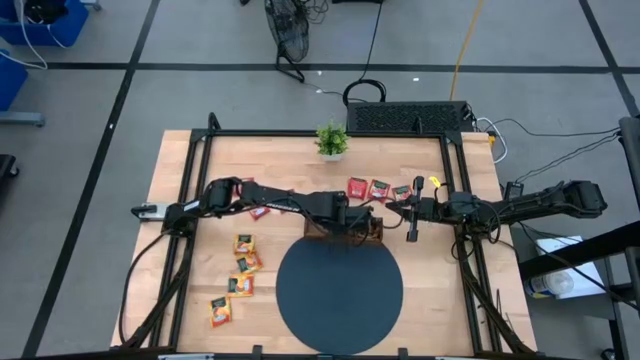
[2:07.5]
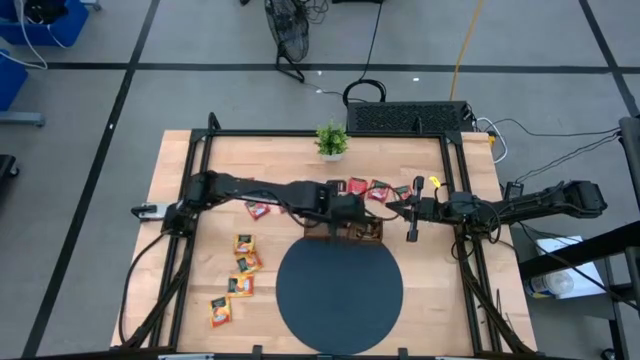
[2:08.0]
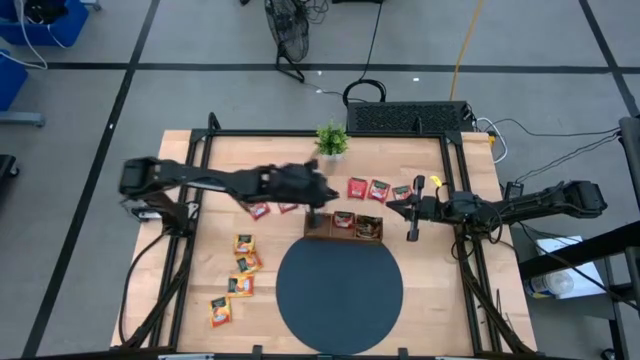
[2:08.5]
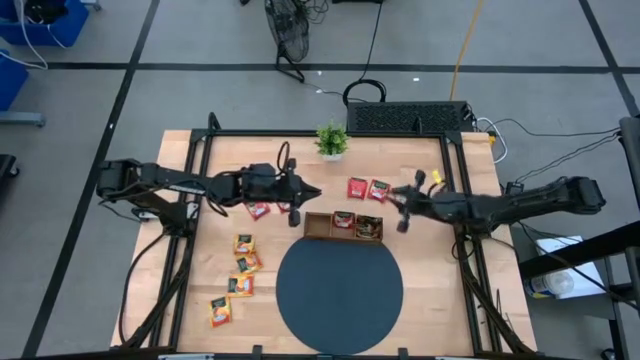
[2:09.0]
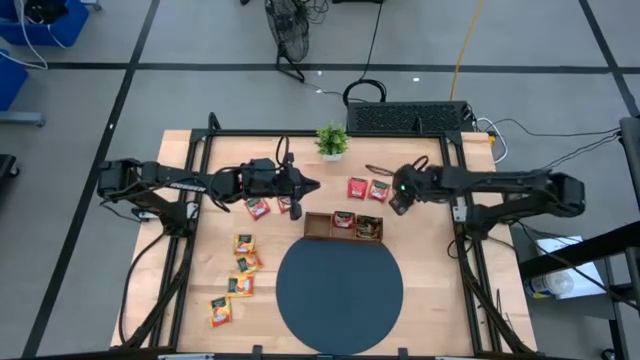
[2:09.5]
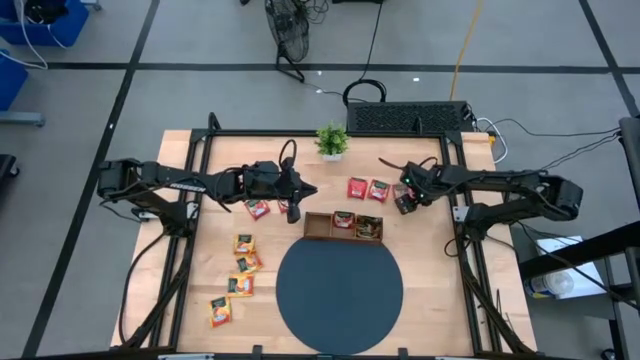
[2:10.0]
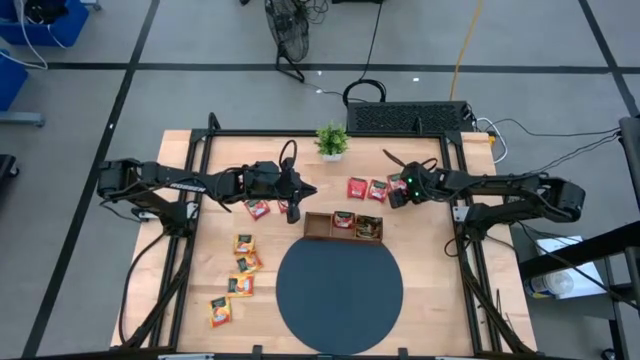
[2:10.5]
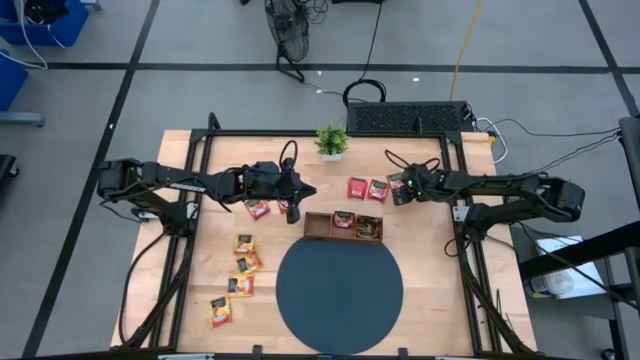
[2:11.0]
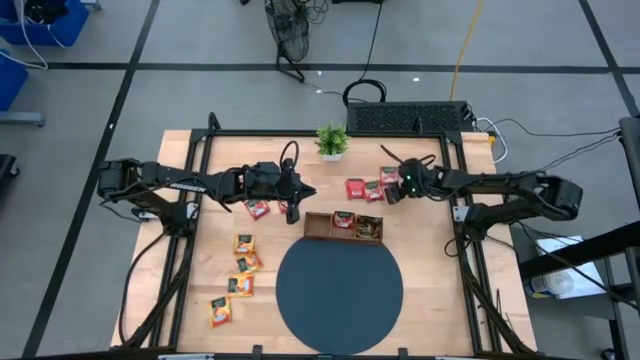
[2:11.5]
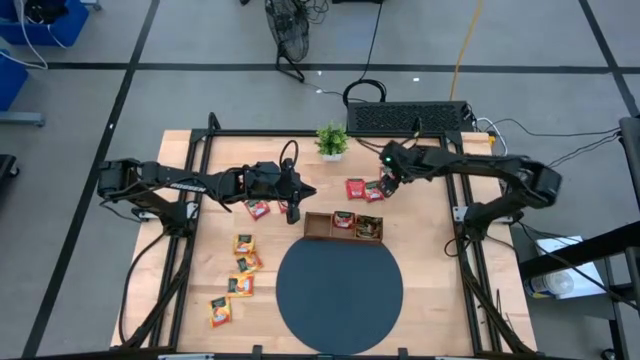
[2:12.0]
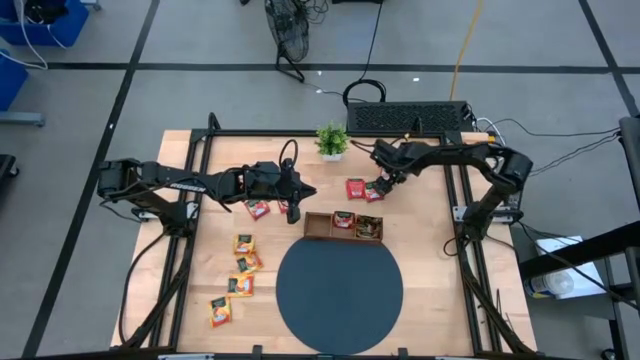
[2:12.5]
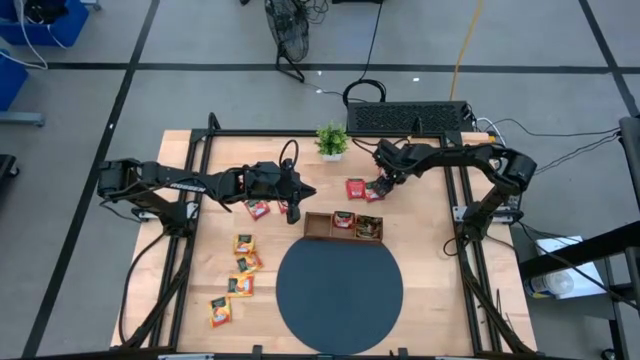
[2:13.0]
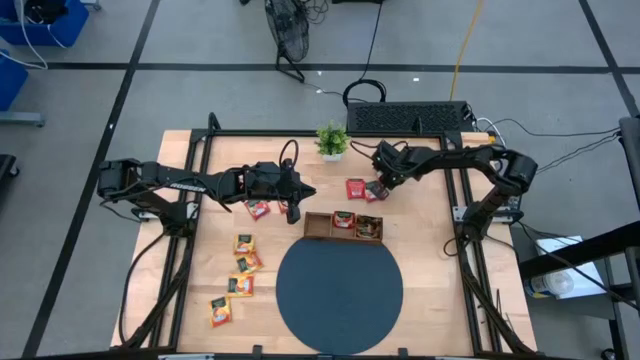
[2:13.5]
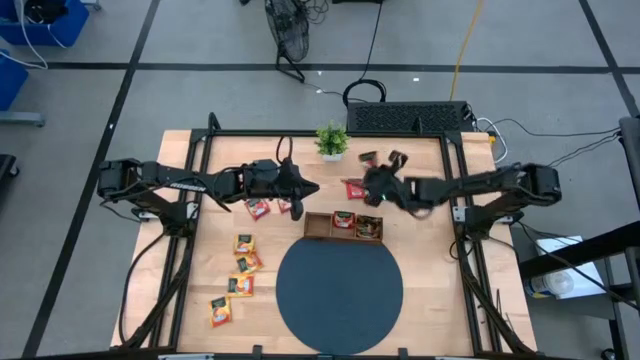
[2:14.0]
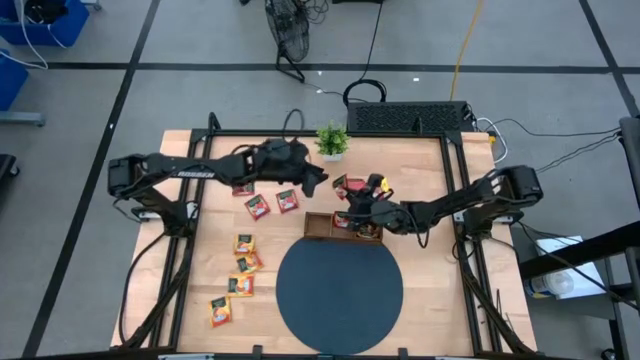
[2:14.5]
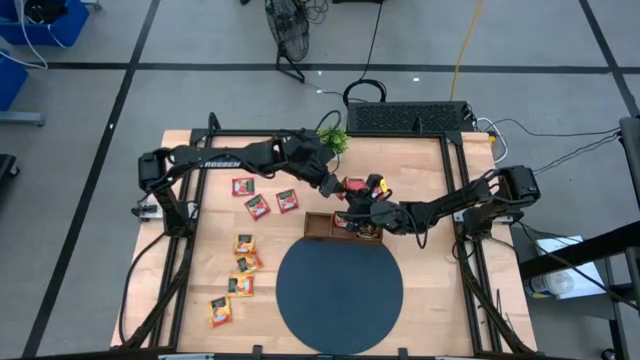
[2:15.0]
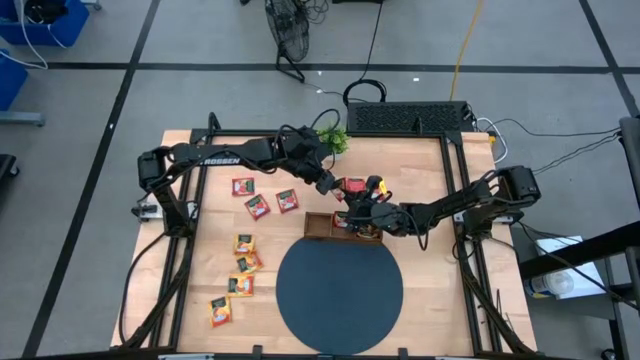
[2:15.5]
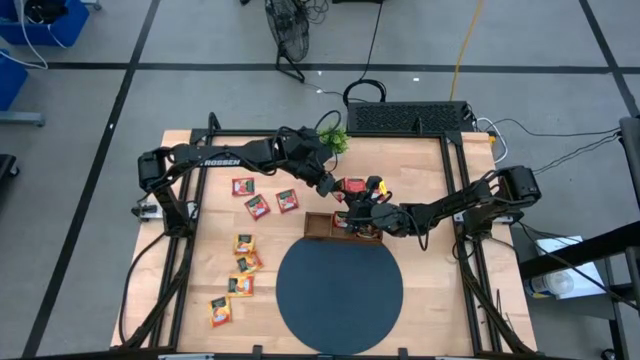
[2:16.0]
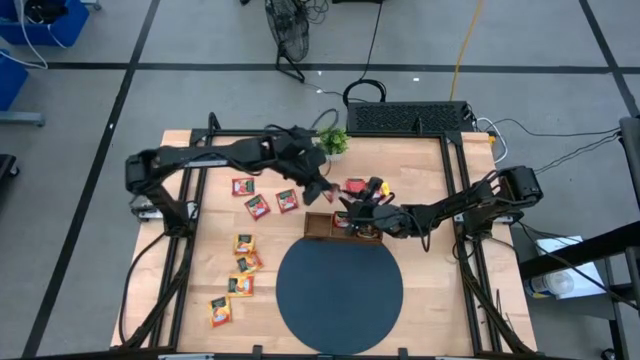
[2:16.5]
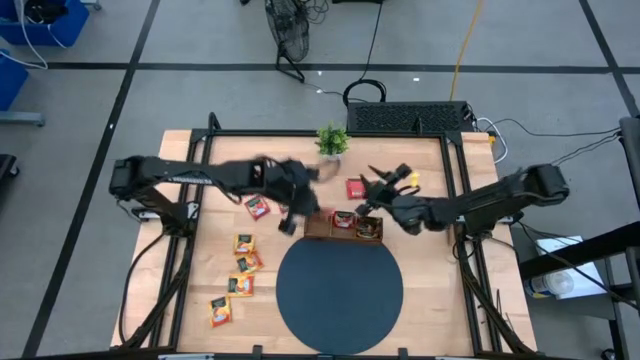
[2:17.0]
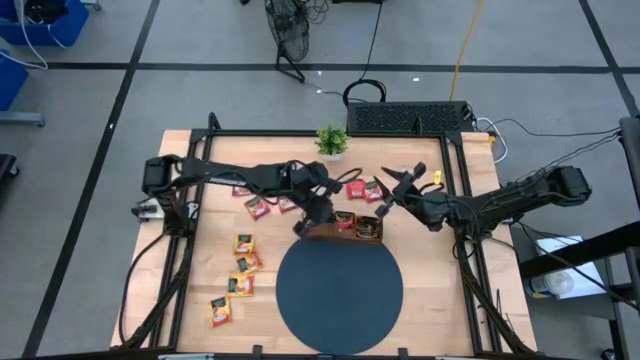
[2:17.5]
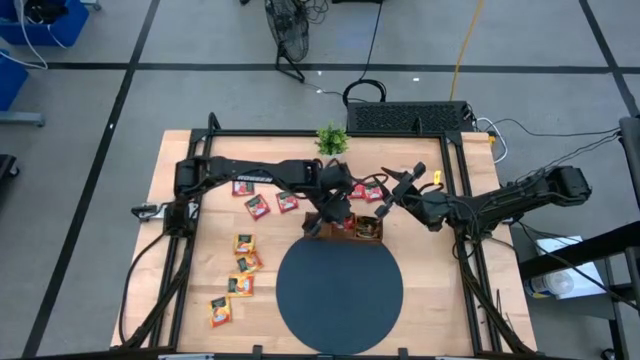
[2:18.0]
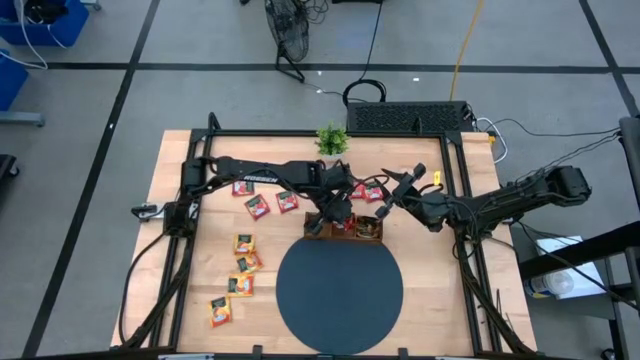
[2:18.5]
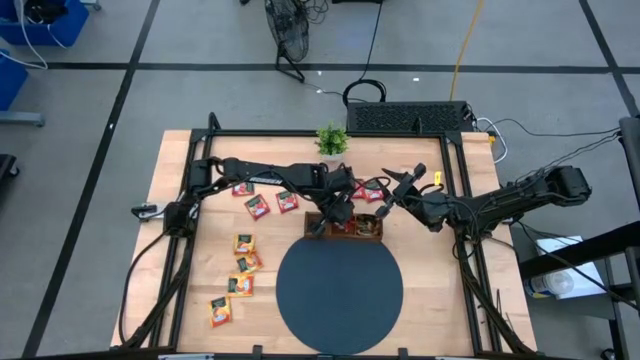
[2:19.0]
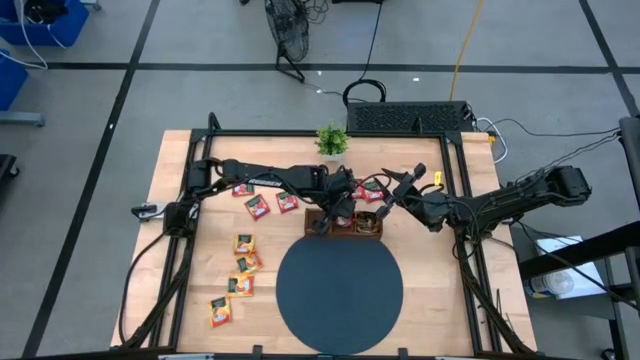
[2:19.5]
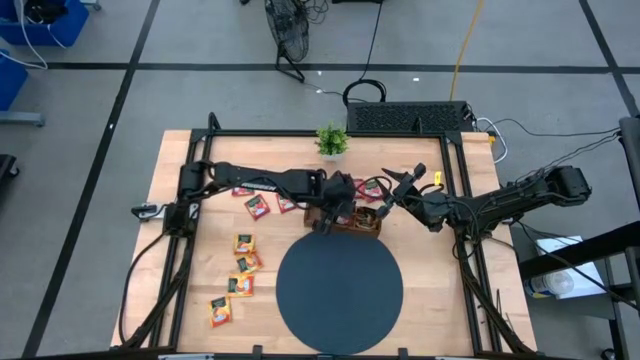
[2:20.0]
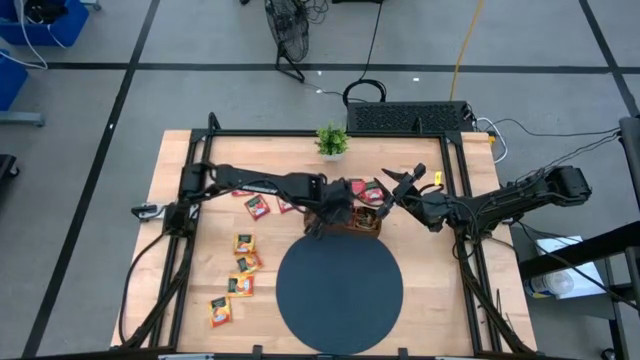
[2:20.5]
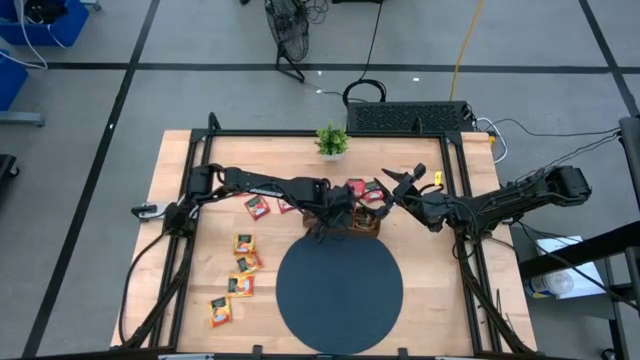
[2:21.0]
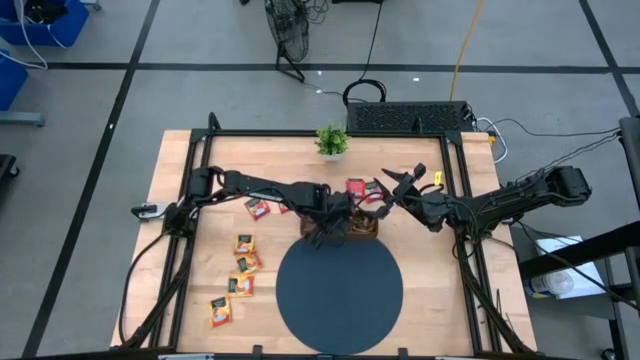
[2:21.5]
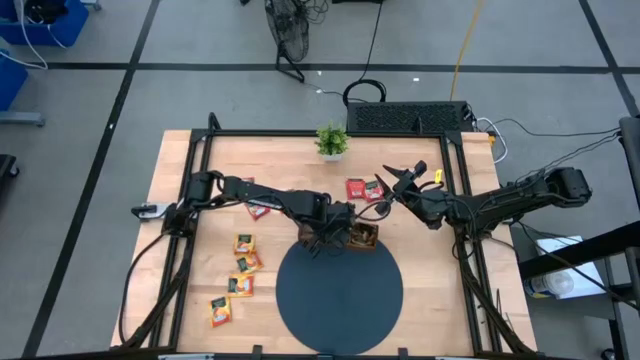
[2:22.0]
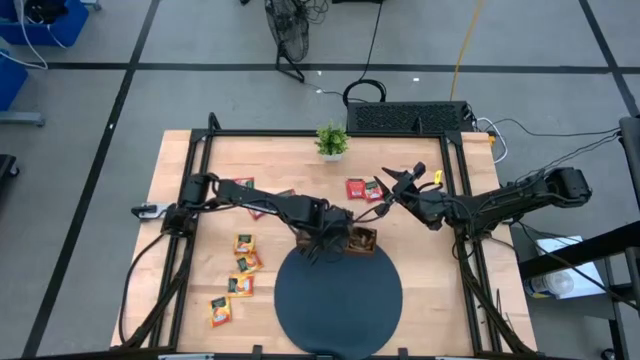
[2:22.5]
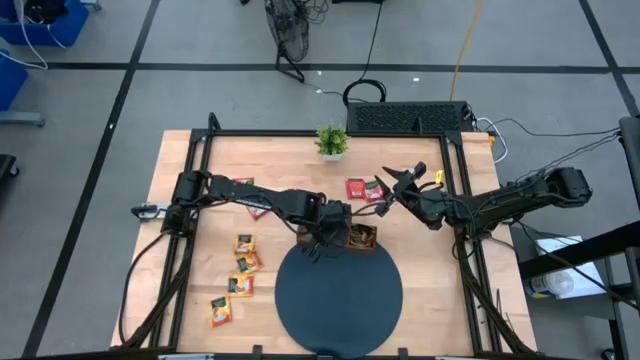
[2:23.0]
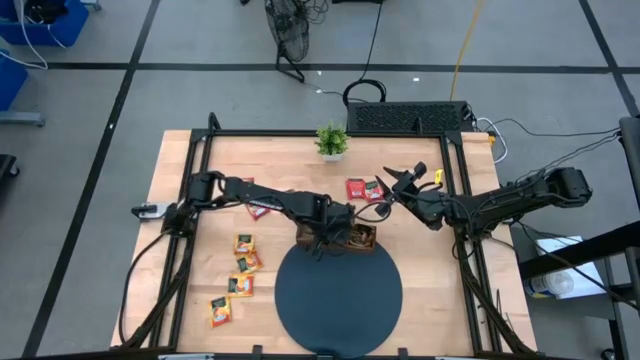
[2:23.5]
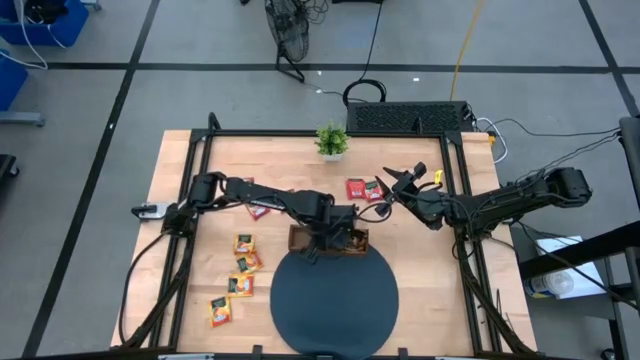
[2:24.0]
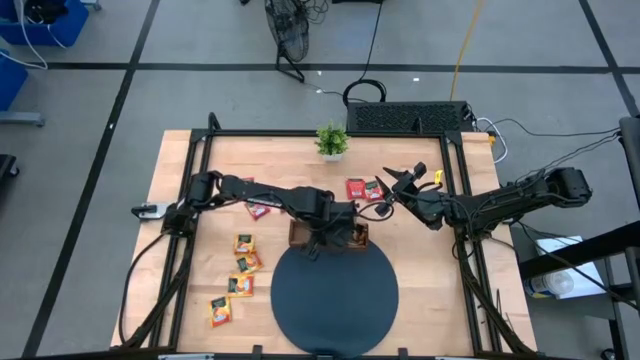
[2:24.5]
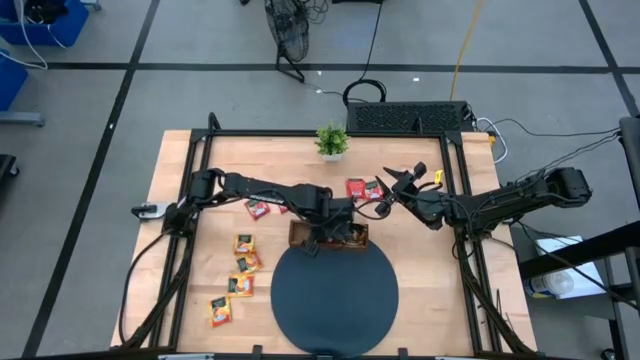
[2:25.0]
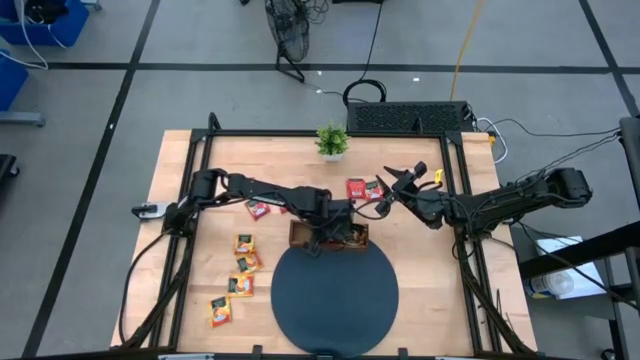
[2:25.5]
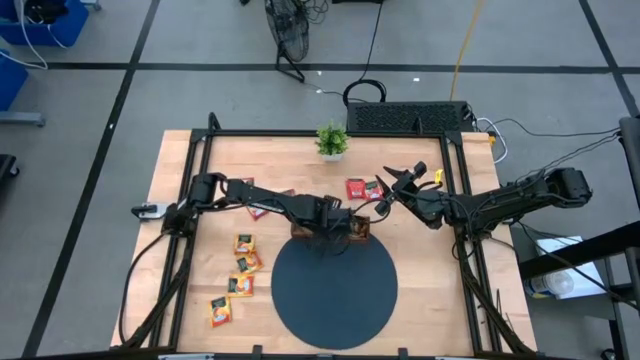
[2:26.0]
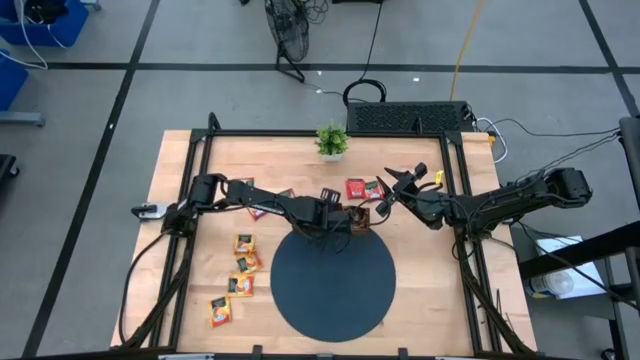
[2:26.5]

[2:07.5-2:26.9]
Task: Pick & Place Tea
Put the red tea bag into the middle slot of the wooden organizer

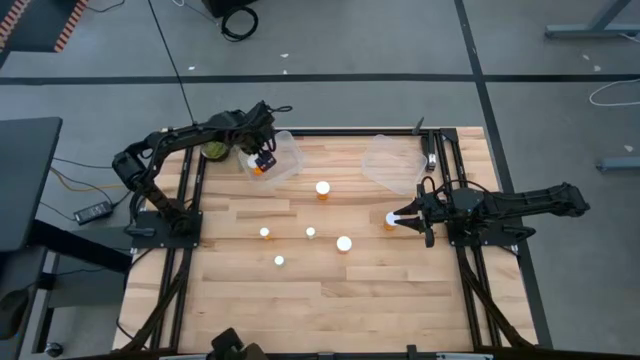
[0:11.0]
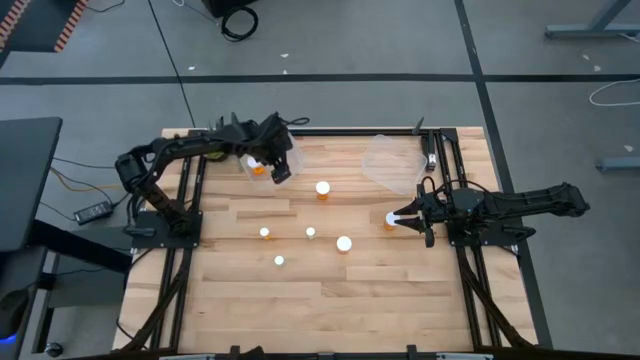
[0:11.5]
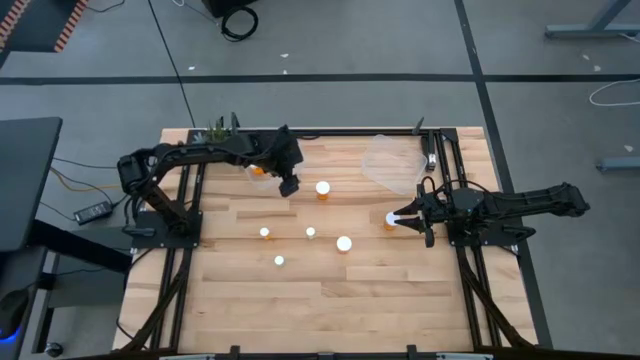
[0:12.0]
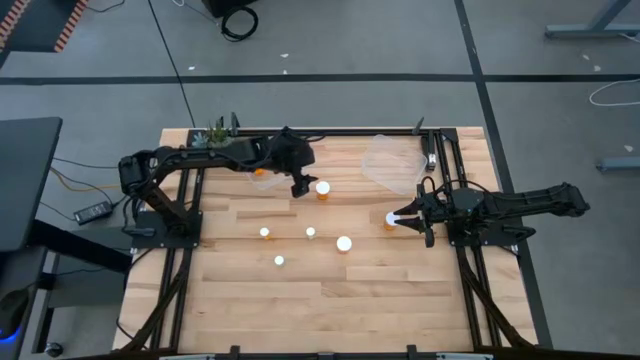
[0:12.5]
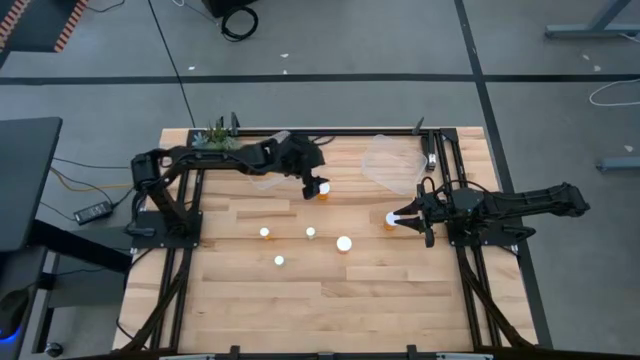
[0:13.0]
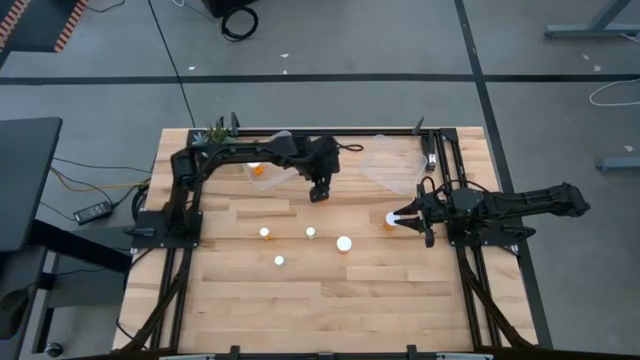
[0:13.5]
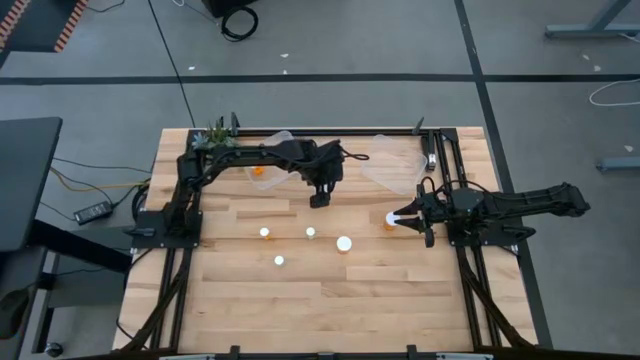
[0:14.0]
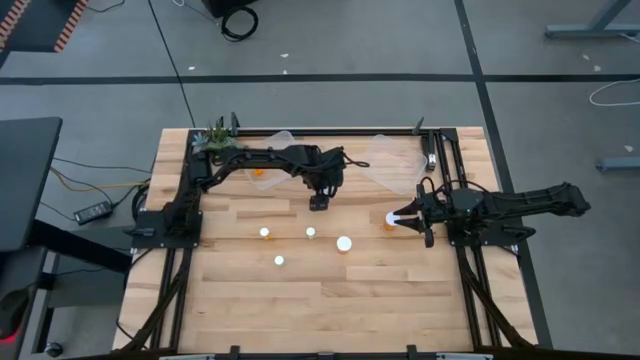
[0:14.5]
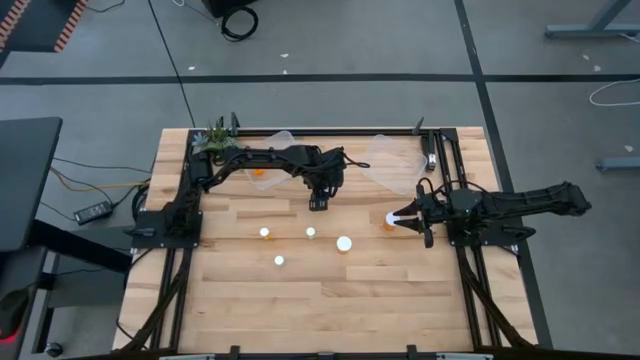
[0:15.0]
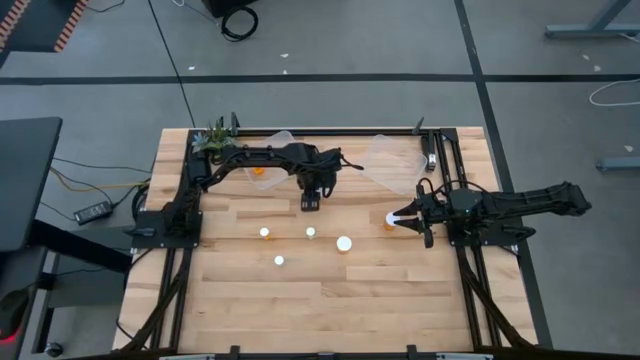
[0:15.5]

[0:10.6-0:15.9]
Task: Pick and place medicine bottles into bin by pill shape (circle, oval)
Put the orange capsule bottle into the left transparent bin
